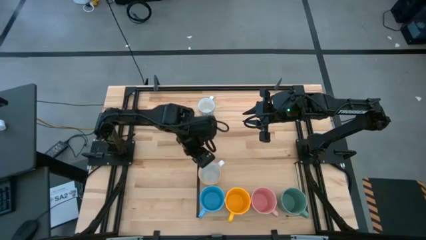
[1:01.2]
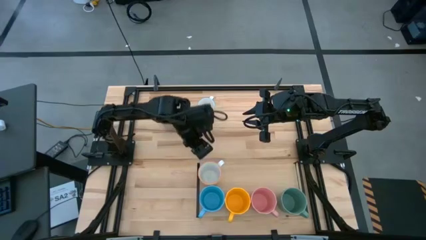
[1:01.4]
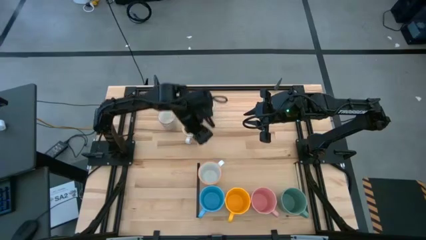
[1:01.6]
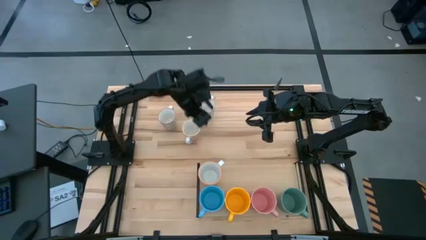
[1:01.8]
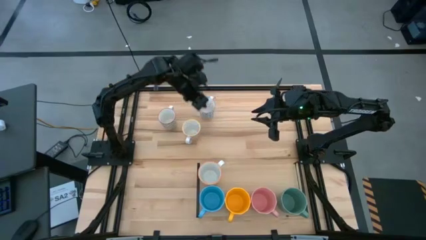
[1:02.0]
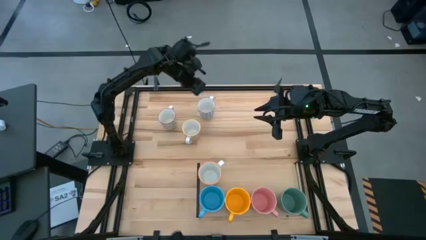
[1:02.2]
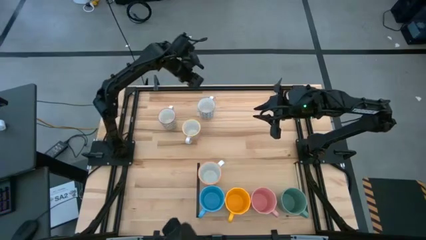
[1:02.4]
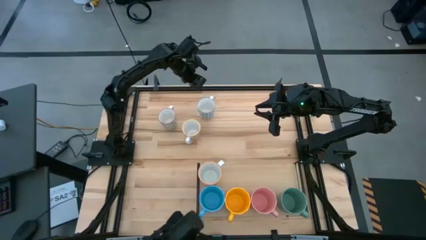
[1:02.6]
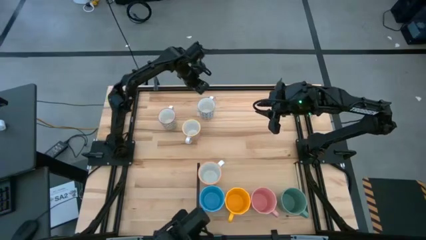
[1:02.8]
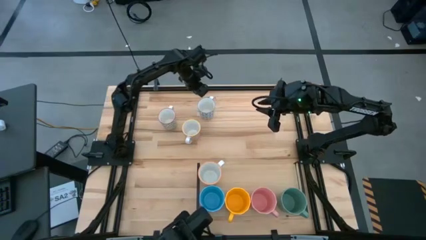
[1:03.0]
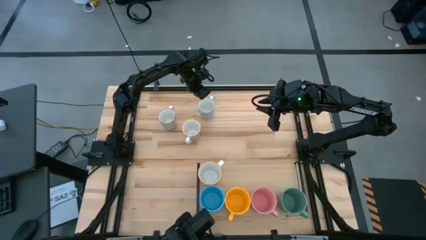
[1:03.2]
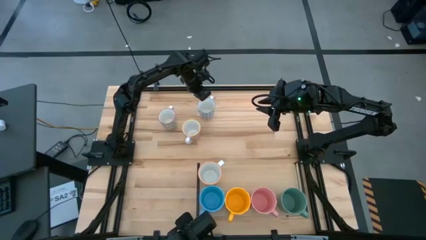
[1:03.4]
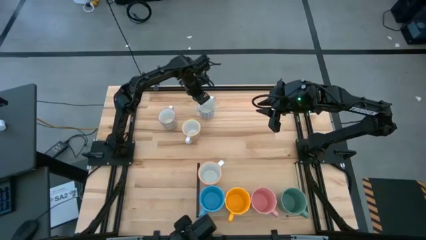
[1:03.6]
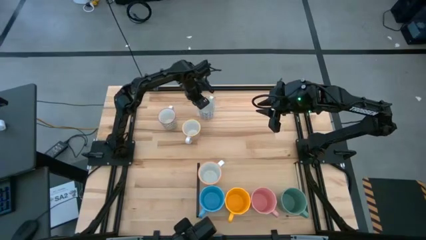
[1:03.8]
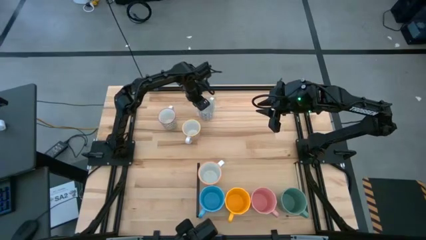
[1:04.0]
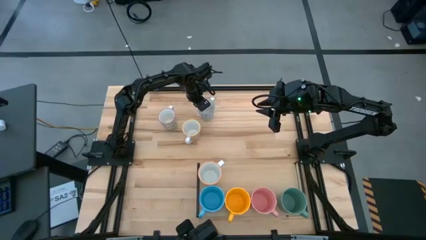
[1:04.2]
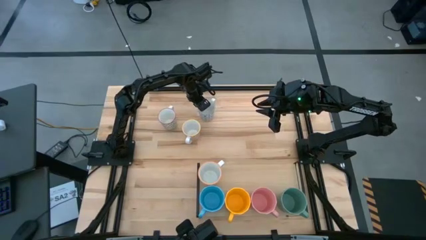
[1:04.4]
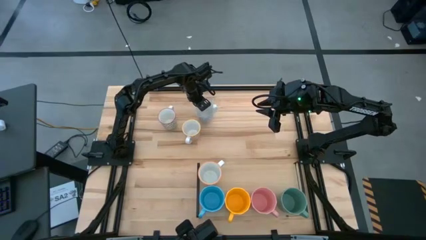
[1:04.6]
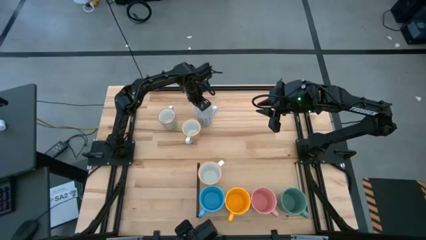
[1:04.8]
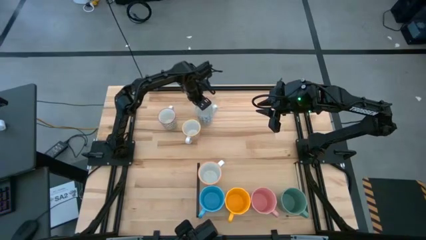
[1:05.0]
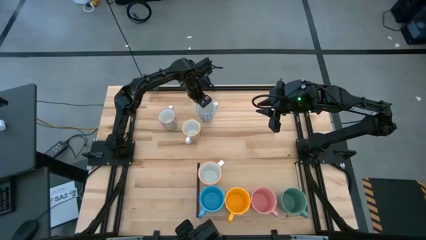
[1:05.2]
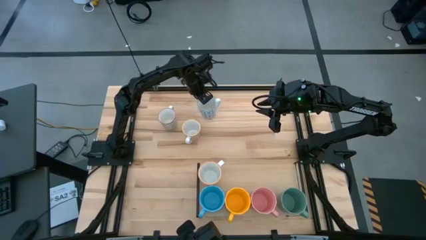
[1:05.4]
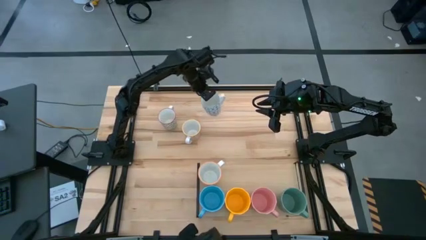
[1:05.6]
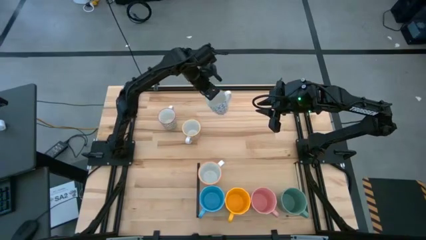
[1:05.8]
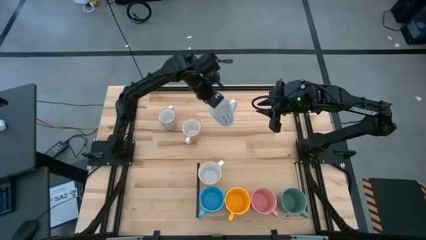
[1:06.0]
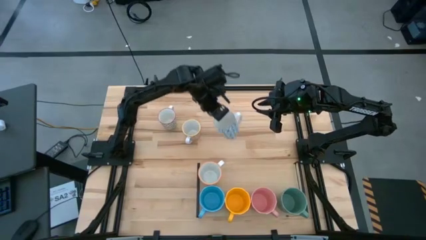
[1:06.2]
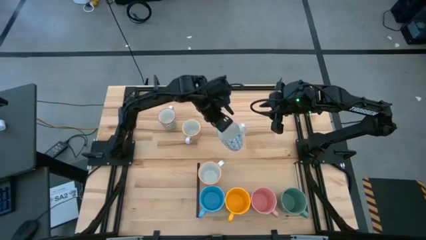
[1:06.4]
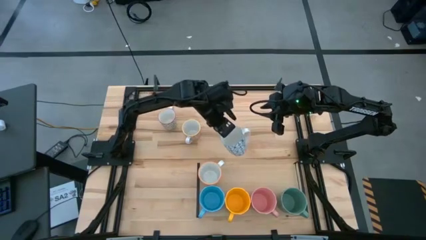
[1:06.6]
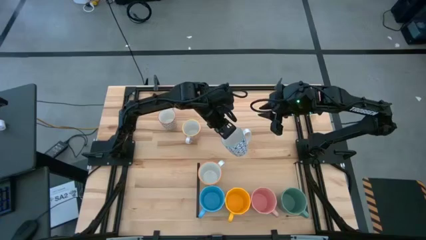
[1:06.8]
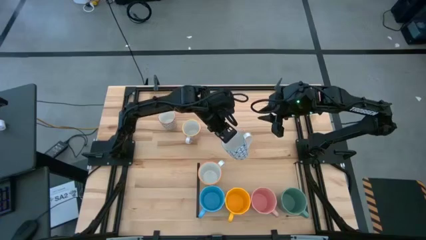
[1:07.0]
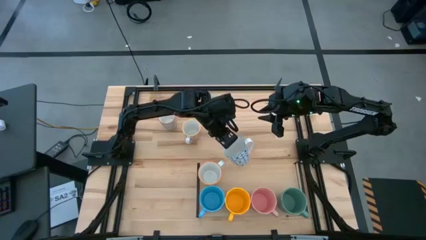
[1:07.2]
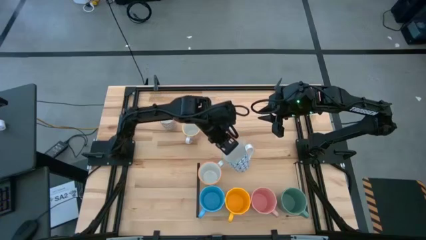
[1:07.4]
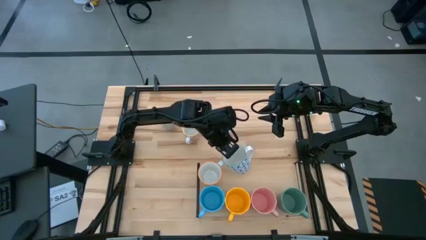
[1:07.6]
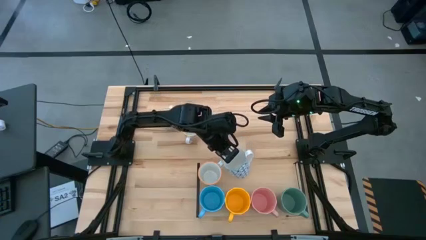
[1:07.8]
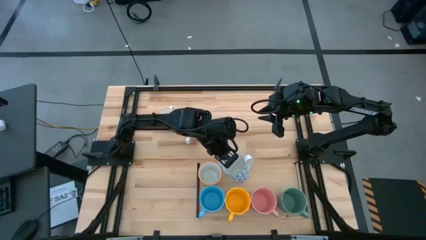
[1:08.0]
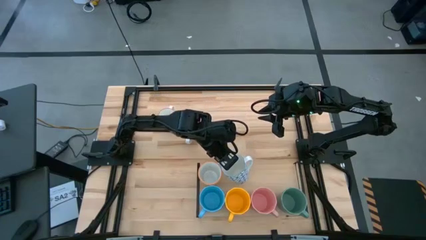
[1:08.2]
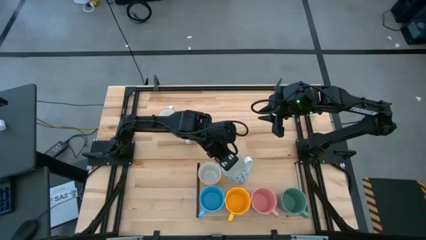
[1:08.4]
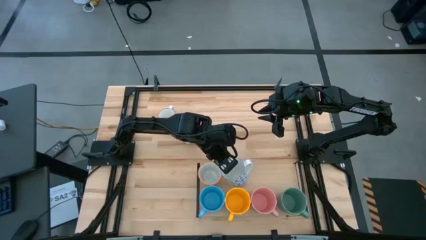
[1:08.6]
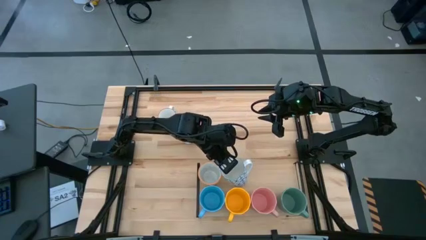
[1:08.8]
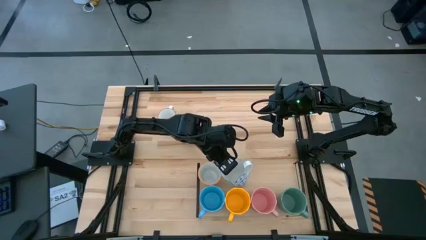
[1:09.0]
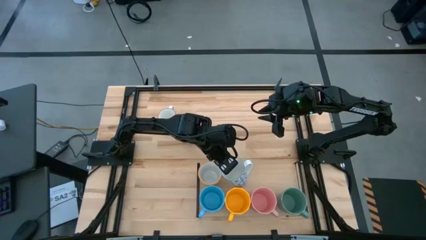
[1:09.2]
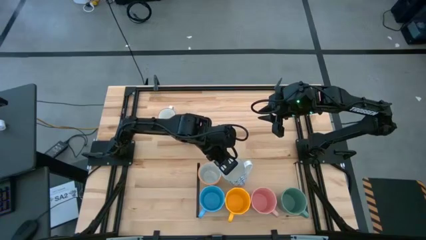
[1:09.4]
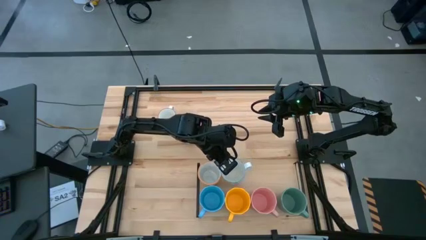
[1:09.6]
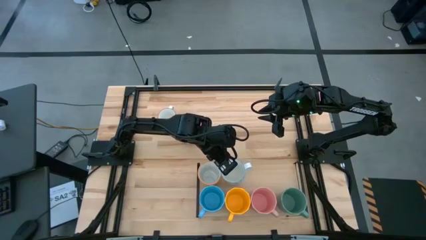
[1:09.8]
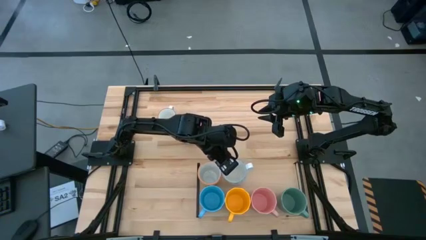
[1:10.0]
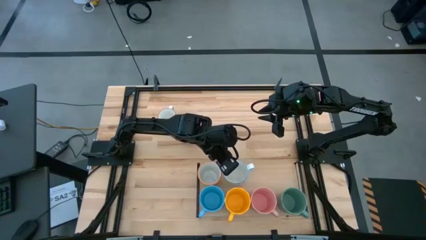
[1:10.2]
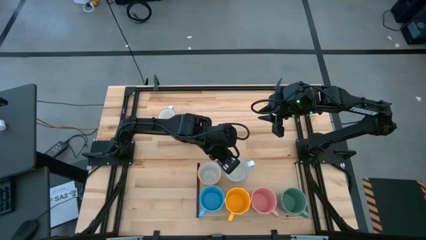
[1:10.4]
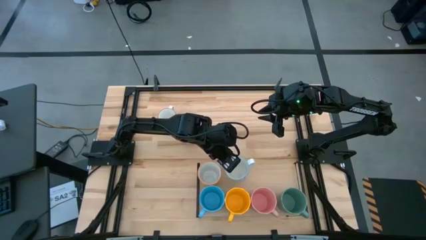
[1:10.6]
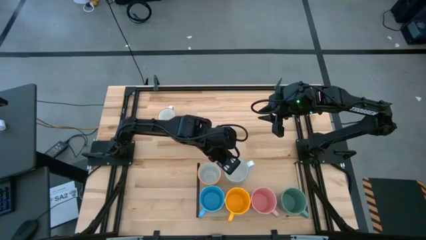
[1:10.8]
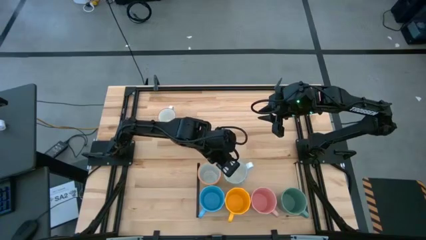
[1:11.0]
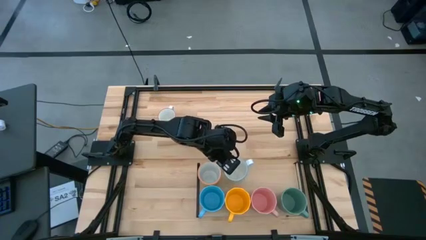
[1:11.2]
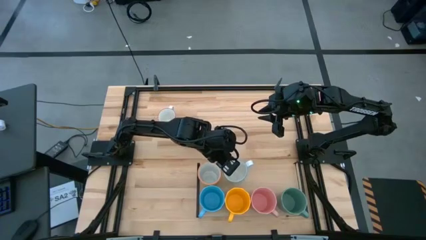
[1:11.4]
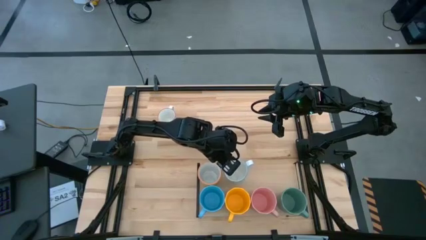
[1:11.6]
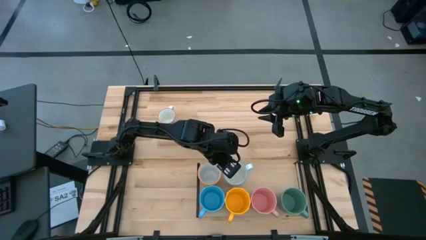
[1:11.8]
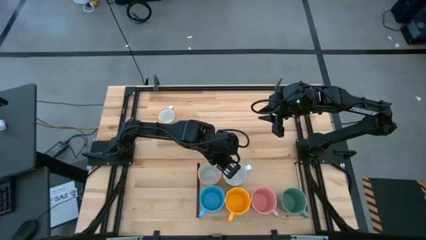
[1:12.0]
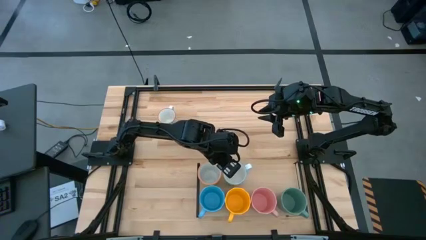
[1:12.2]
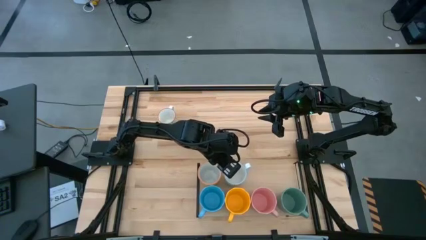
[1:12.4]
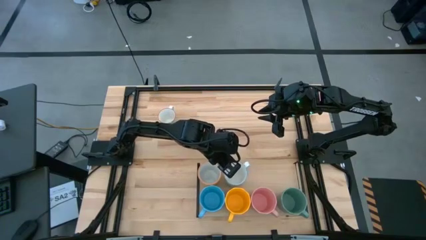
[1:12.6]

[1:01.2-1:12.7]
Task: Place coffee mugs
Put the blue patterned mug on the shelf

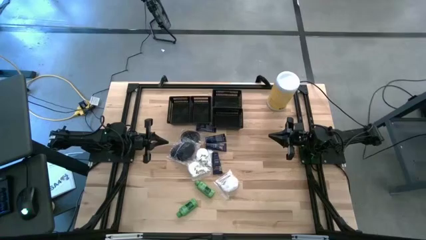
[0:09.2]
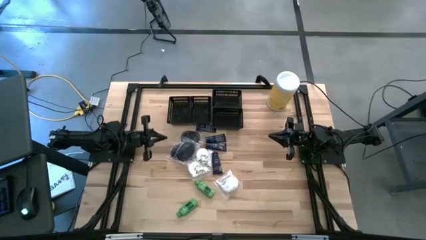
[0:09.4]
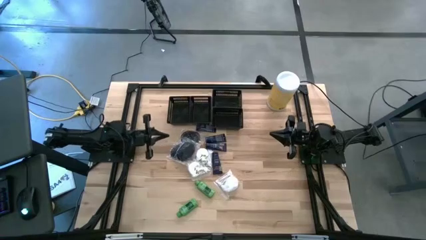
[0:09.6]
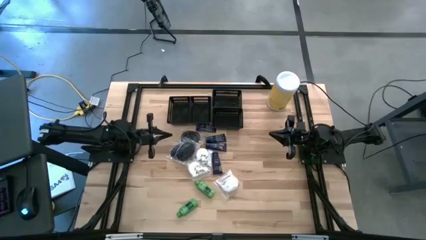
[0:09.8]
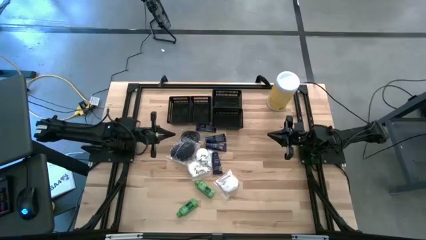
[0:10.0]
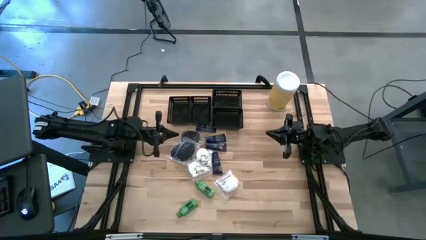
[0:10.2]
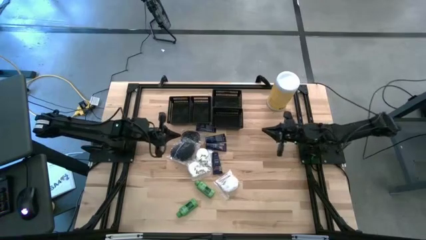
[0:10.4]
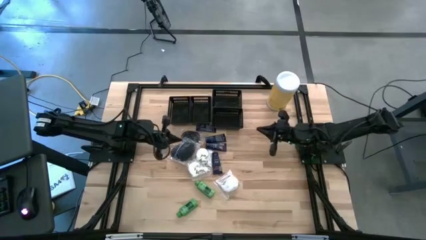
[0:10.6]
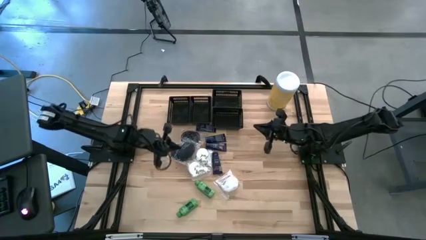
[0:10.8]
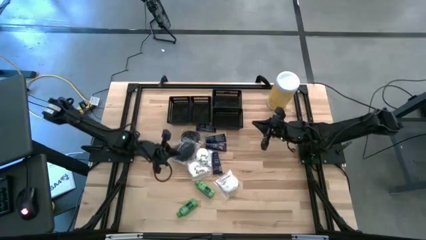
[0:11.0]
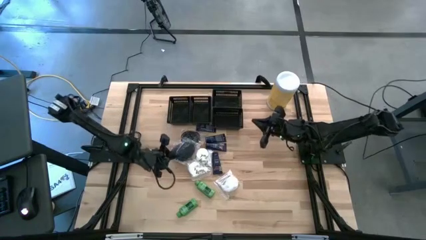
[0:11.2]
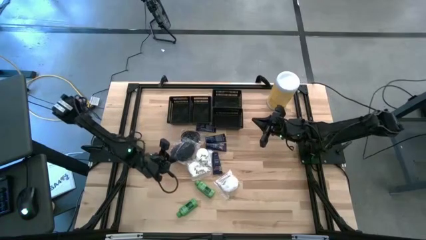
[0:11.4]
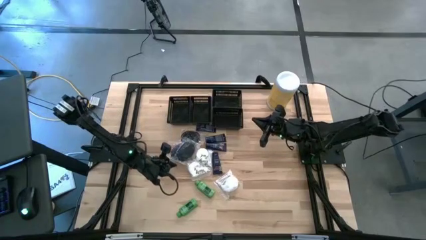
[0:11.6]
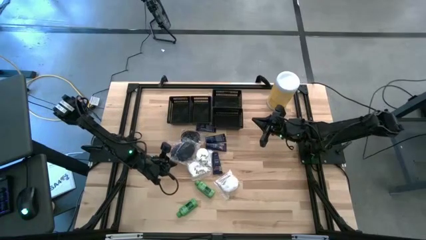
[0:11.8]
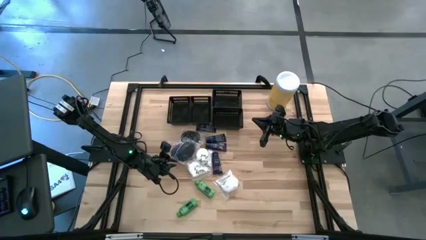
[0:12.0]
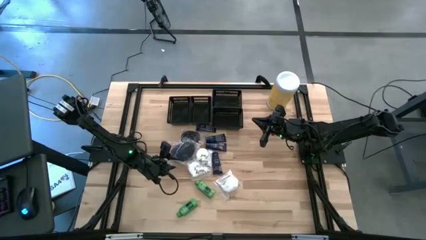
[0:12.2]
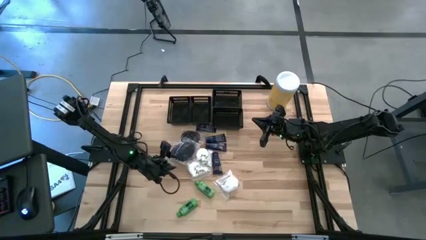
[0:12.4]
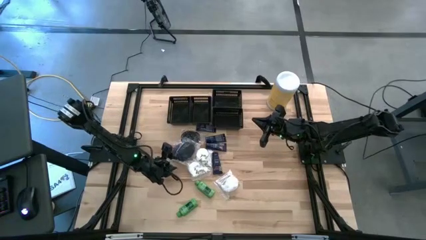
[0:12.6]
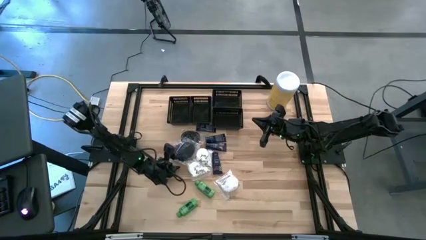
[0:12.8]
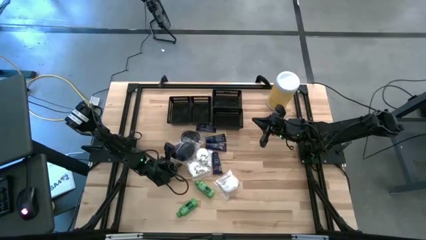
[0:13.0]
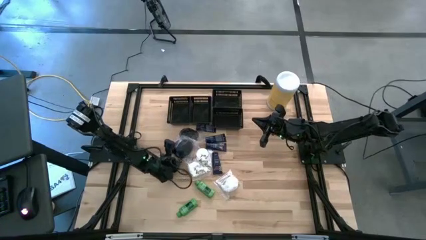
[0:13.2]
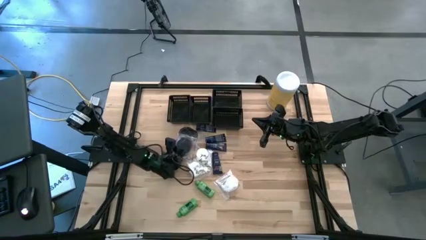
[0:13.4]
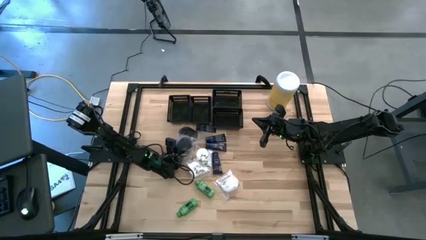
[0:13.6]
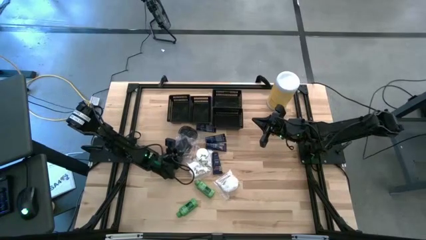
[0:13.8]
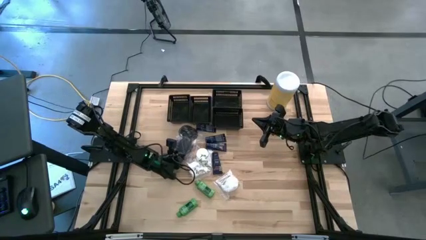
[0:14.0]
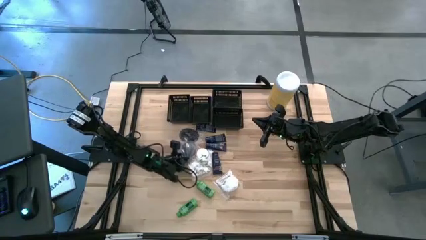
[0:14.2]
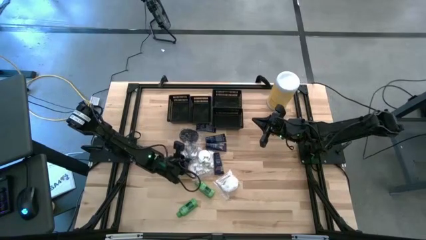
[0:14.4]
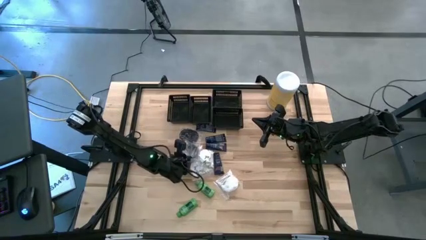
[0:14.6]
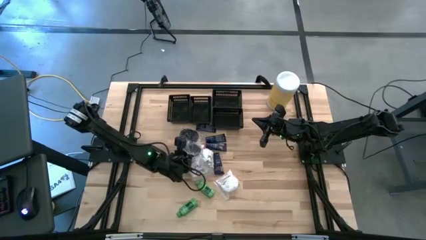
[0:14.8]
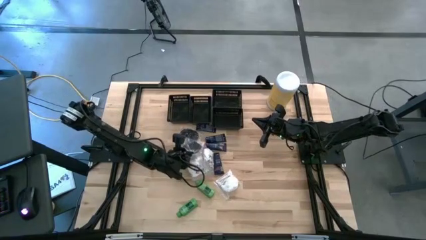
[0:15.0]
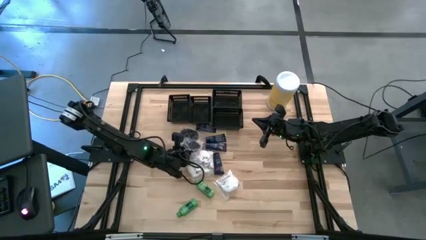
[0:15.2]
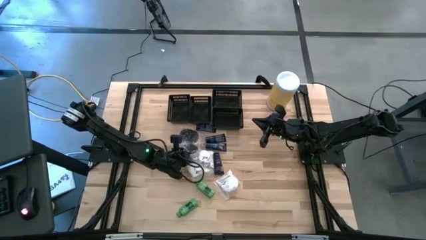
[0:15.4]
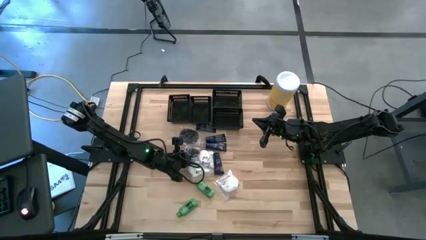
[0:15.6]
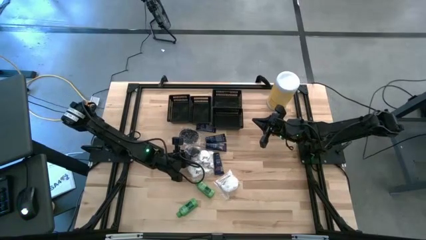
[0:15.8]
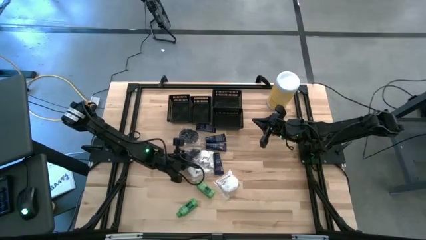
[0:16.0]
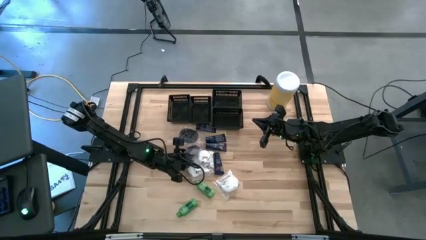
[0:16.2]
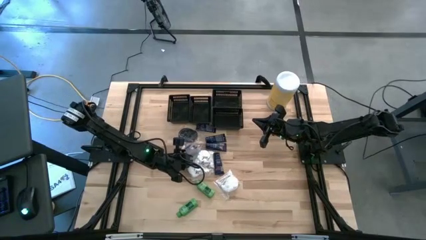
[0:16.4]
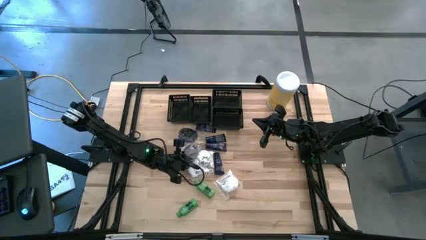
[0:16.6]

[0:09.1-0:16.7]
Task: Pick & Place Travel size toiletries
Put the middle black hairbrush into the left black bin
